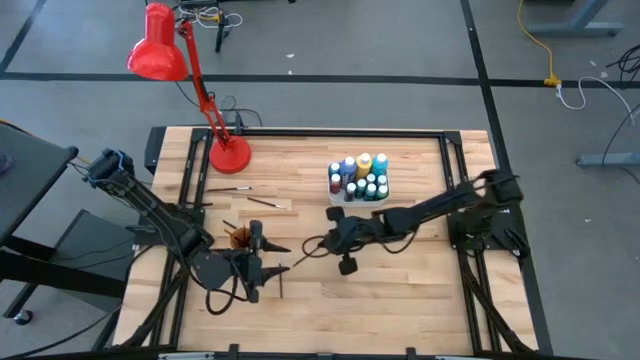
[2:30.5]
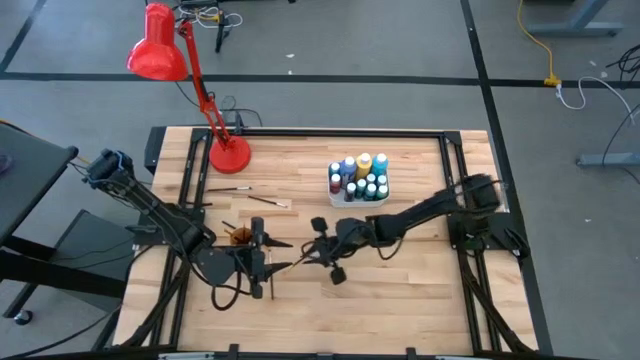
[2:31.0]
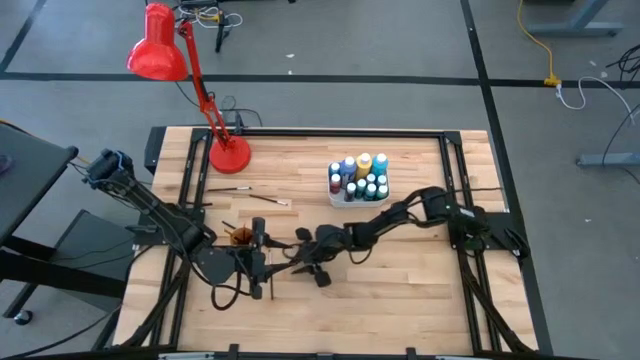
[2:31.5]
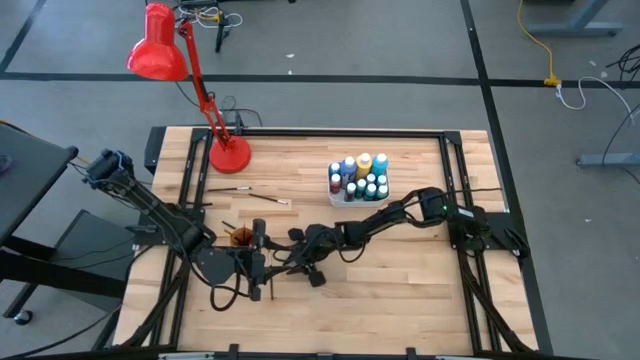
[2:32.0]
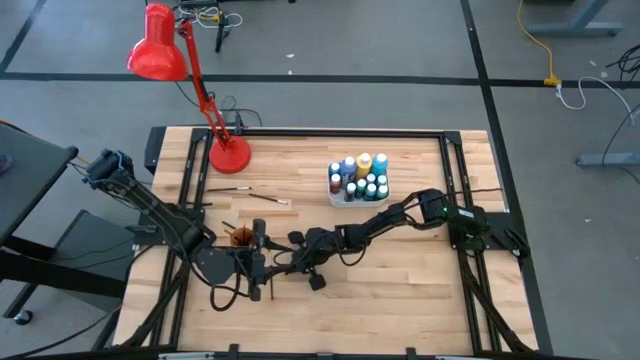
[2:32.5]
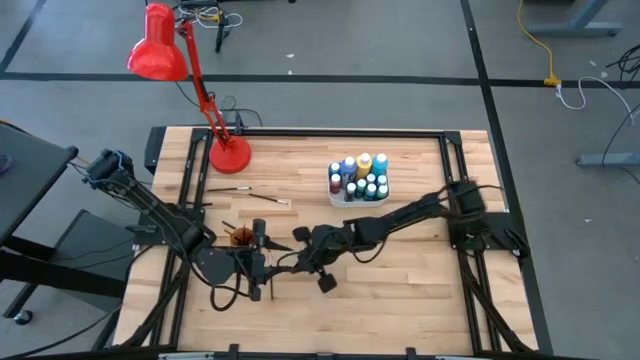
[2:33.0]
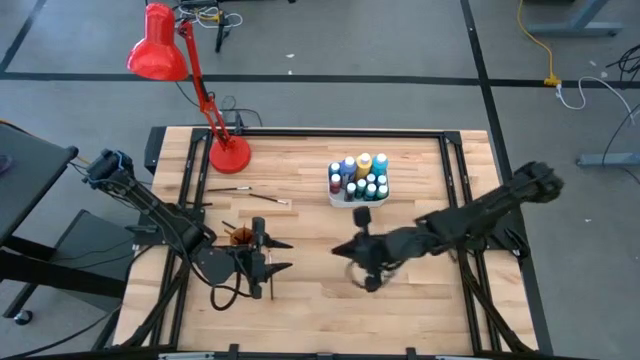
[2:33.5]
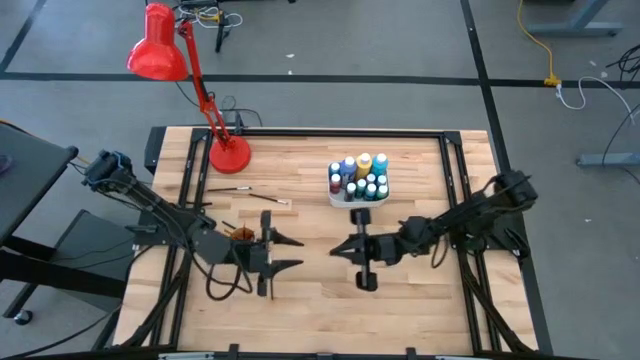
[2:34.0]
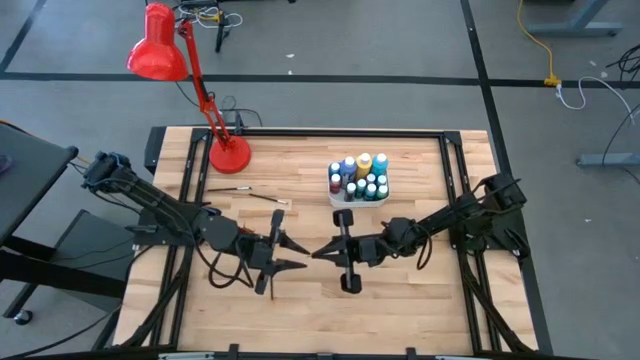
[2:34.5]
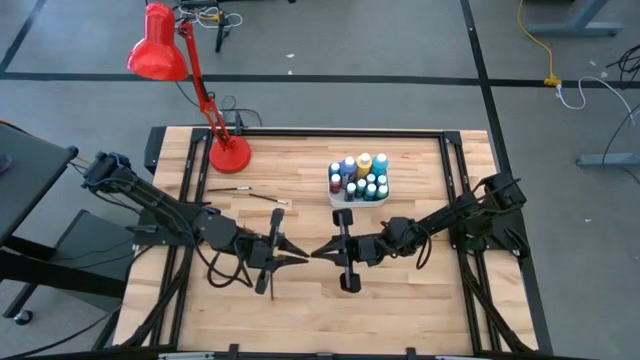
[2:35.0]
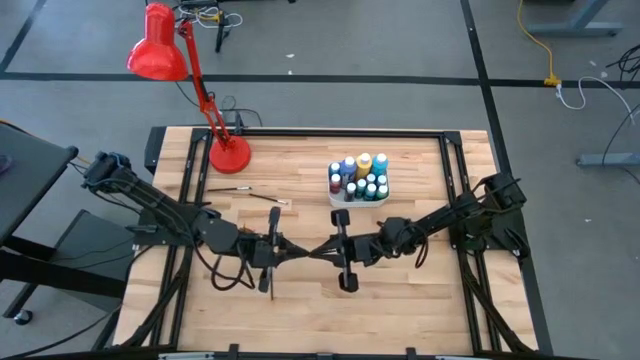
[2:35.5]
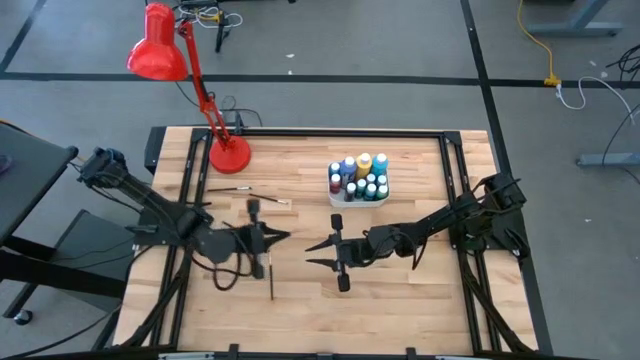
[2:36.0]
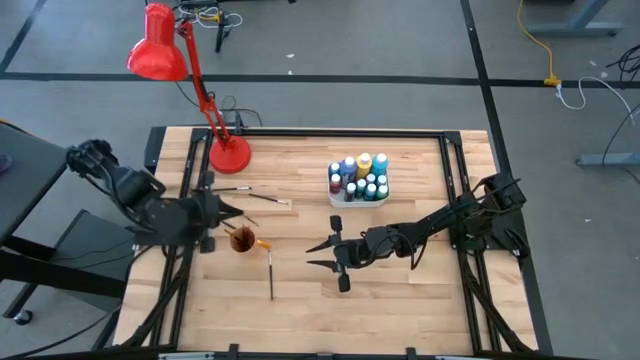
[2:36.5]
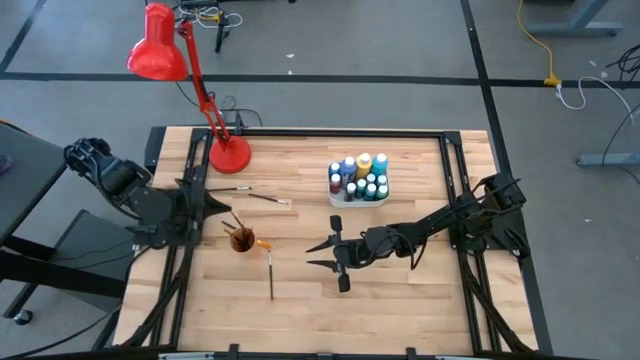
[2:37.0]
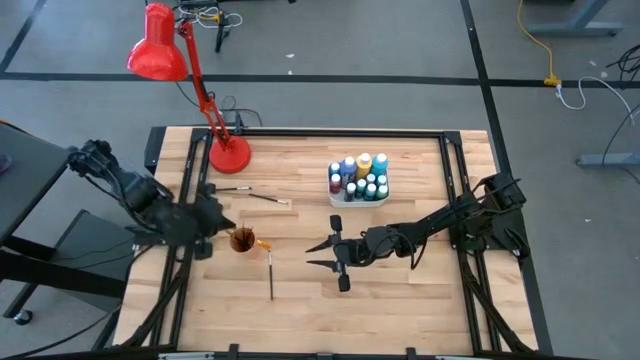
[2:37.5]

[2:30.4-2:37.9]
Task: Pick & Place Paint Supplies
Put the gold paint brush into the orange cup

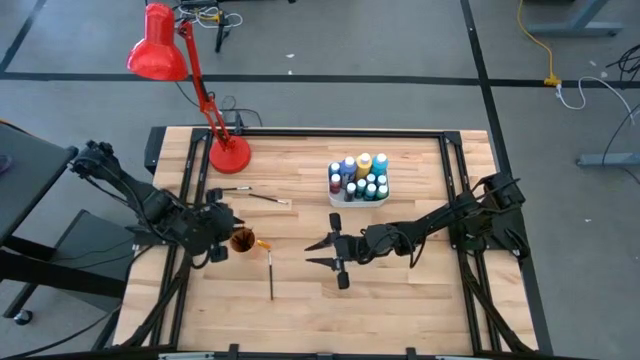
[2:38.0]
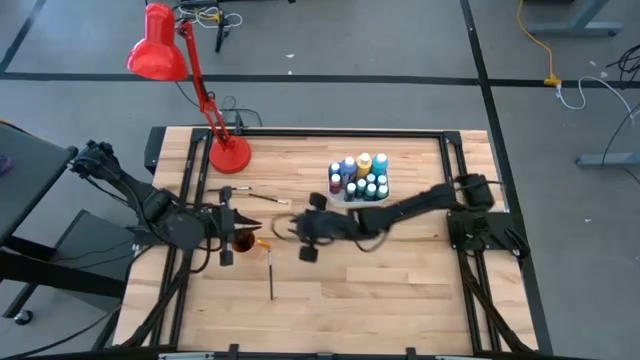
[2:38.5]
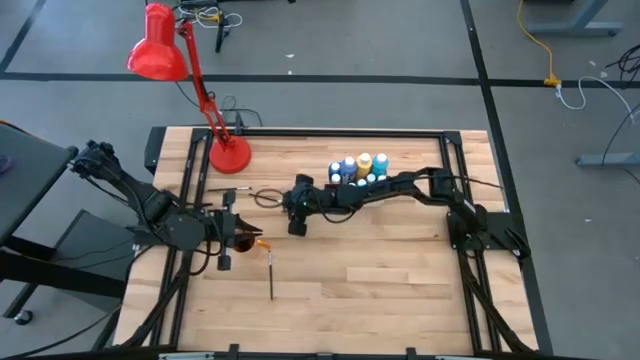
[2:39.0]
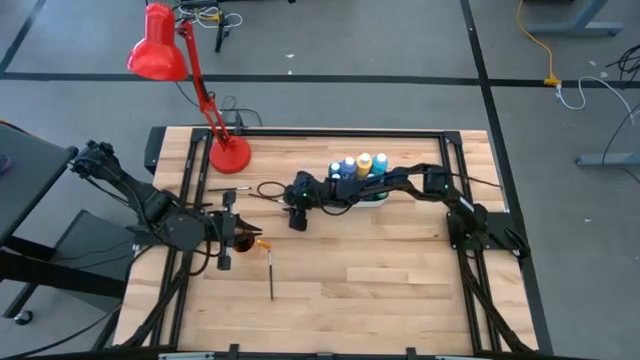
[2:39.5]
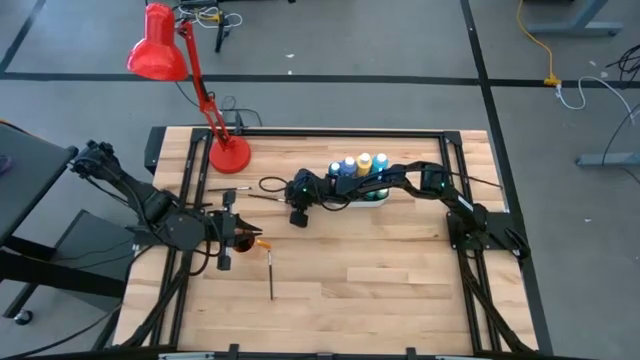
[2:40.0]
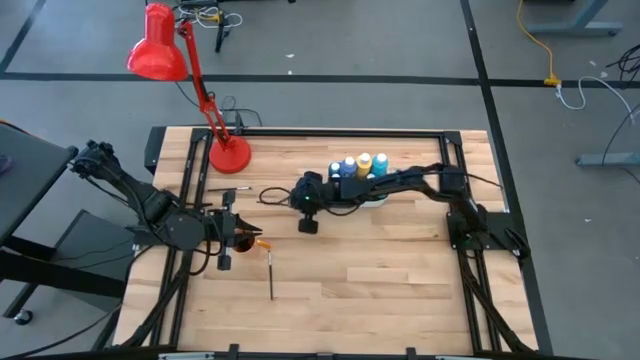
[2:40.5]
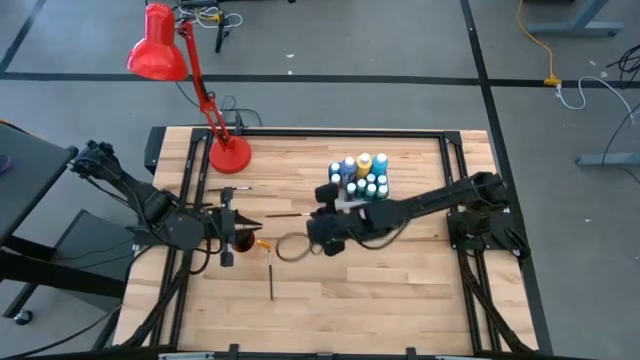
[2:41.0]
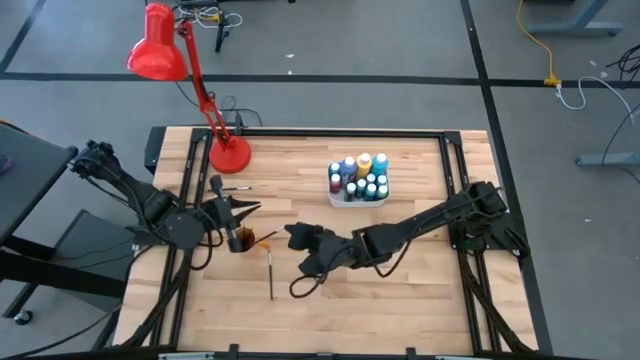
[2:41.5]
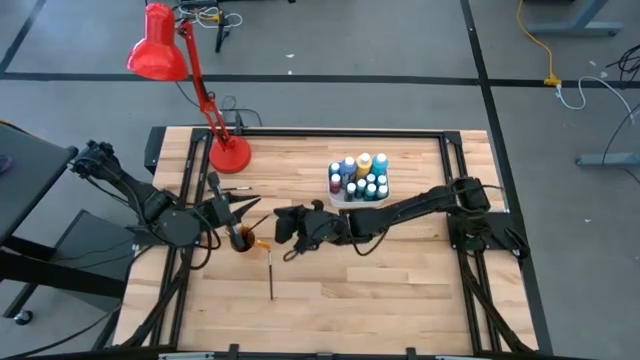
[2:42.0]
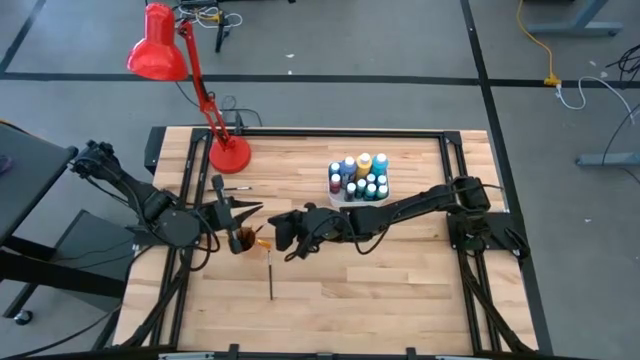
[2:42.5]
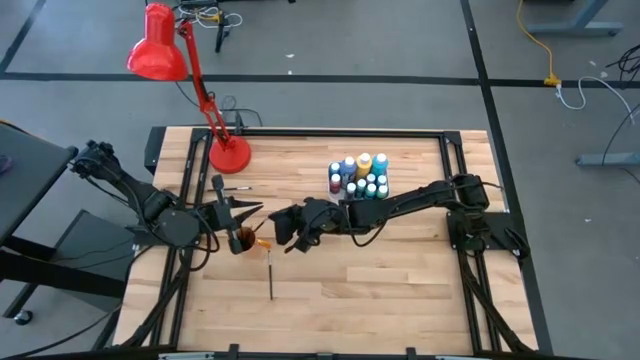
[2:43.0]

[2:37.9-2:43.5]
Put the silver paint brush into the orange cup

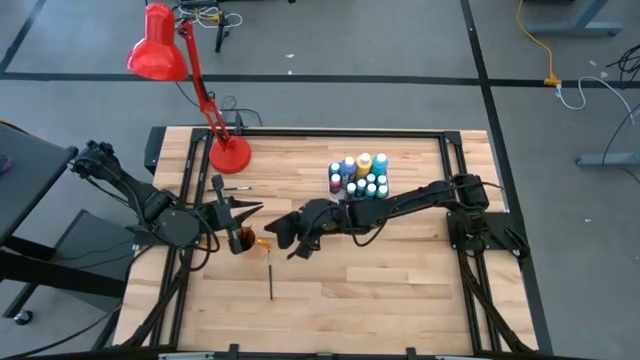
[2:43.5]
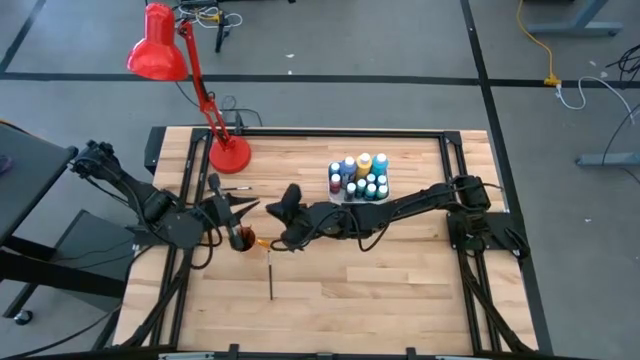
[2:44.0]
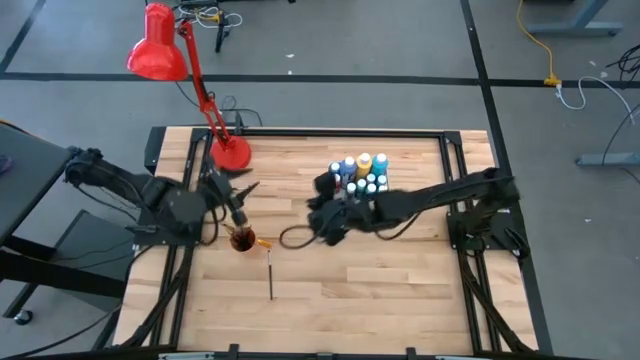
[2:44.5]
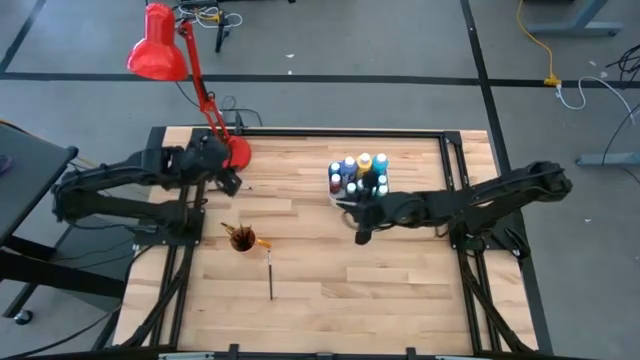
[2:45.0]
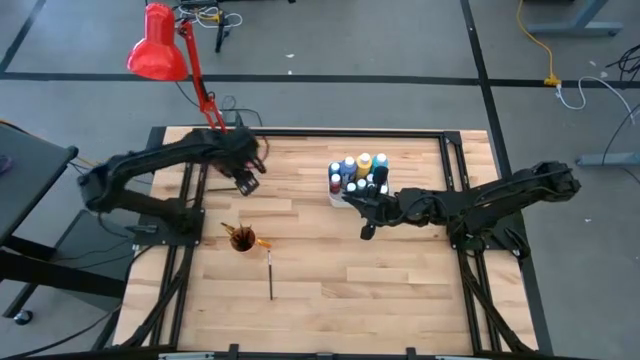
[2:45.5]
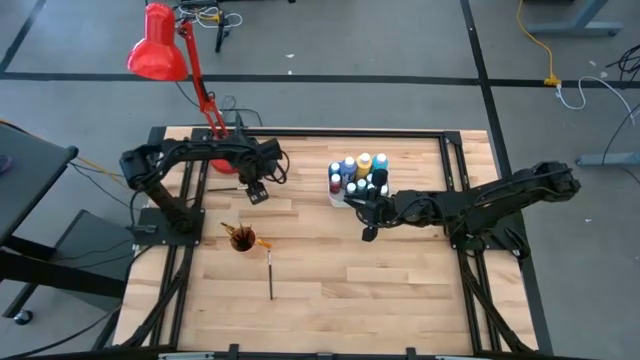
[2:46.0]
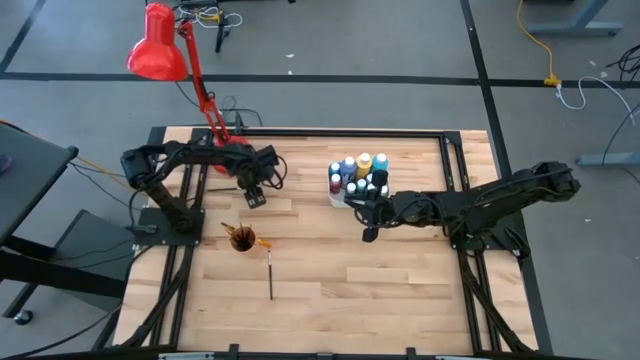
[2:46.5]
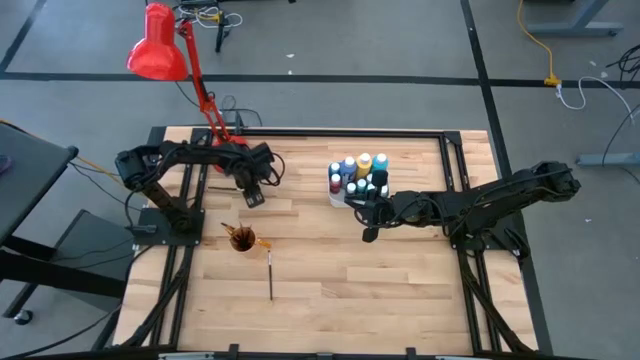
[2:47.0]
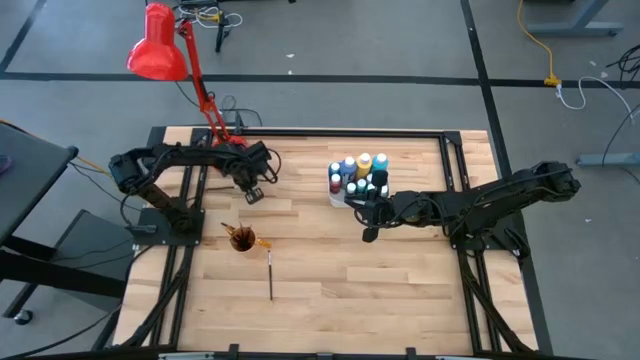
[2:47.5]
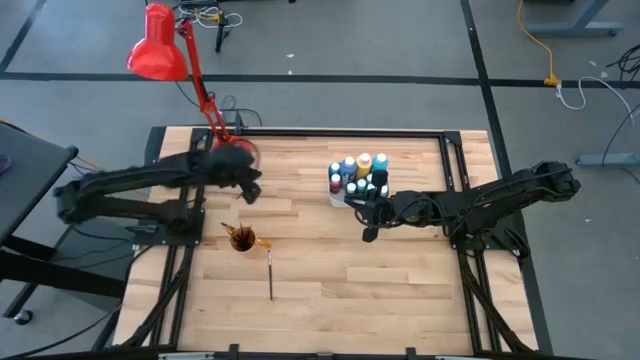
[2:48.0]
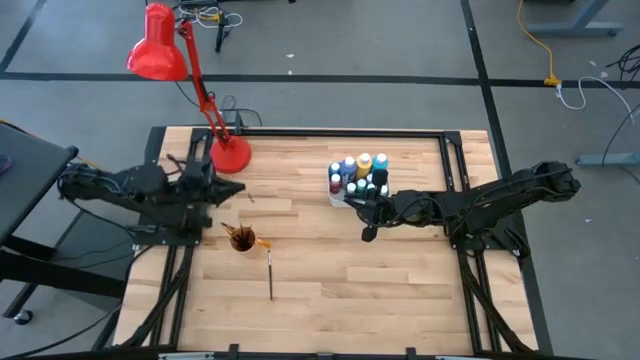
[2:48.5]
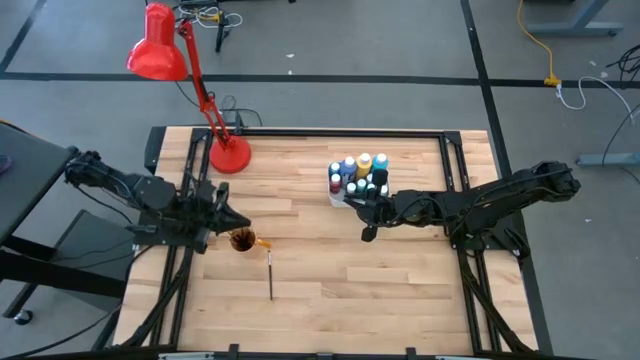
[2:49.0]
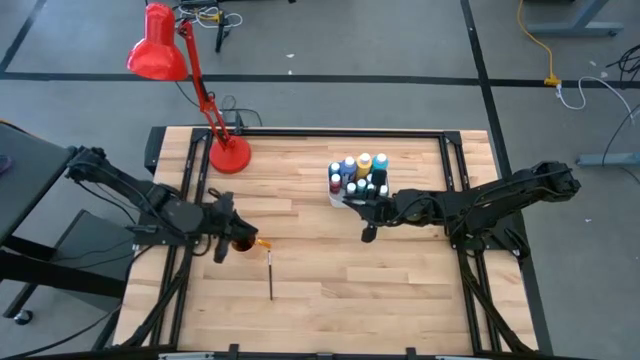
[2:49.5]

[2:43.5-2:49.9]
Put the silver paint brush into the orange cup

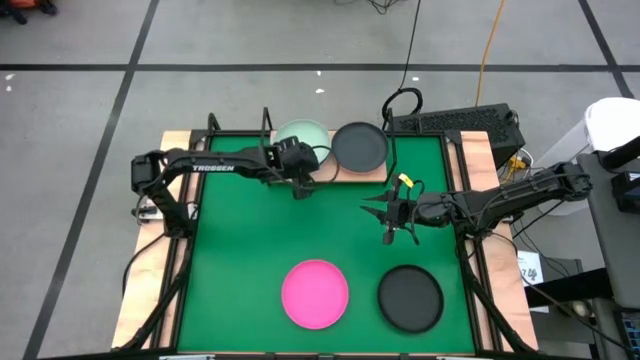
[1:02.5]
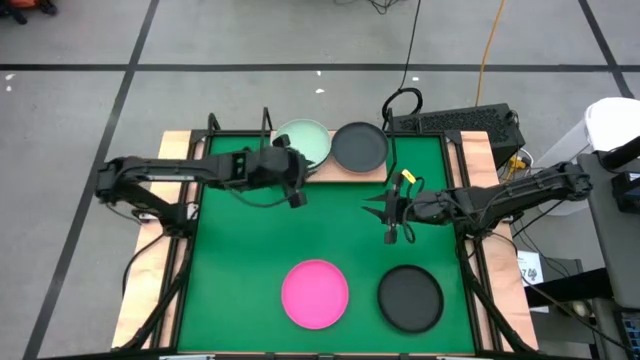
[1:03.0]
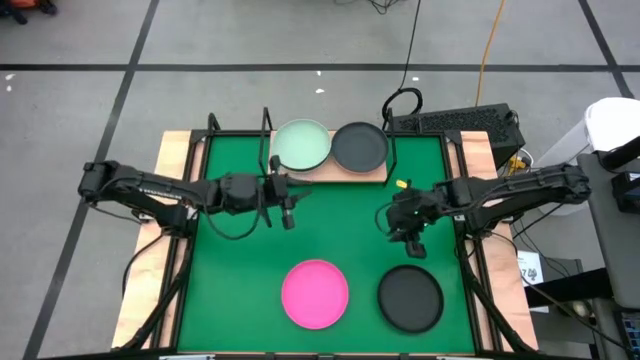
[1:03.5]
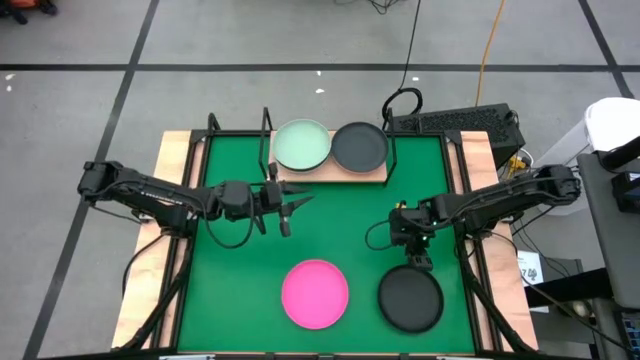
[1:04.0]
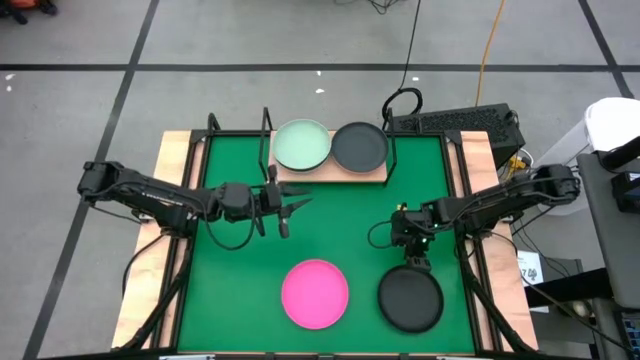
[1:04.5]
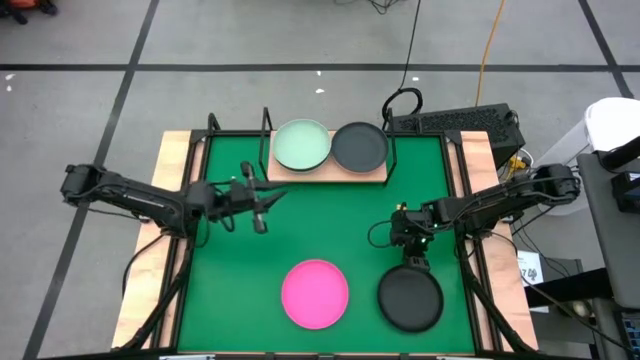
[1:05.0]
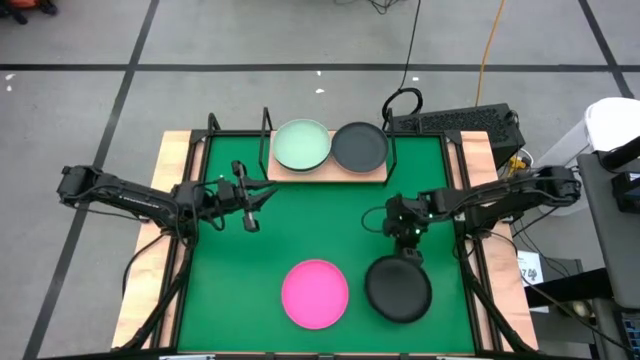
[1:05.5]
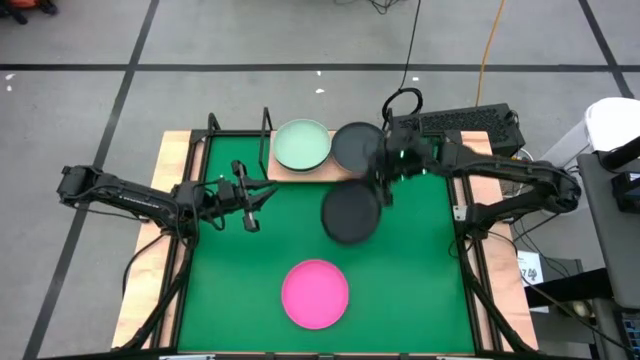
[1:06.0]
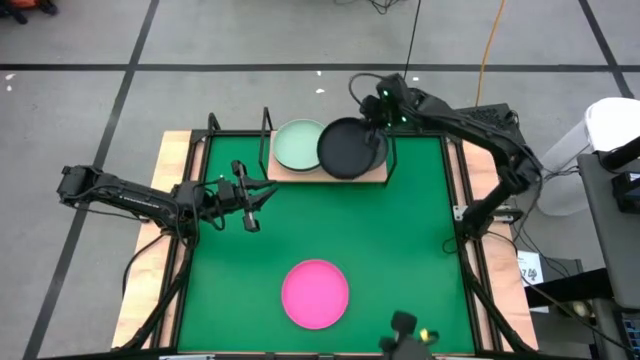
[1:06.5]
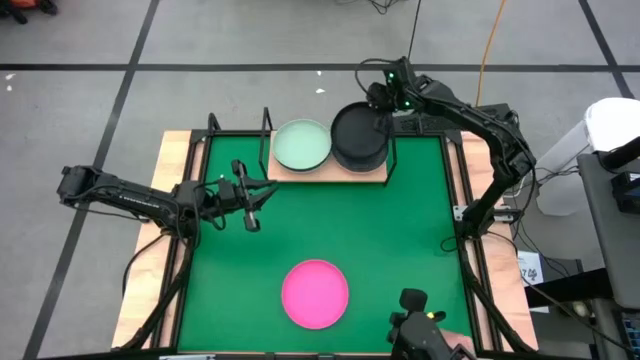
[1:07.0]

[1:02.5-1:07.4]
Task: Place and stack plates onto a shelf
Stack the black plate on top of the black plate on the shelf
